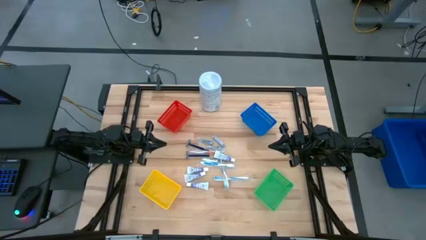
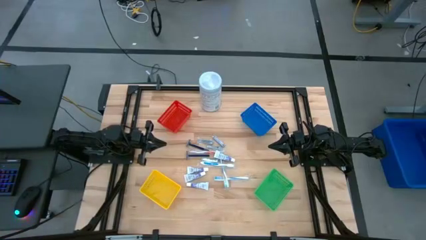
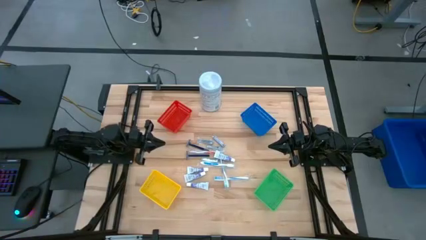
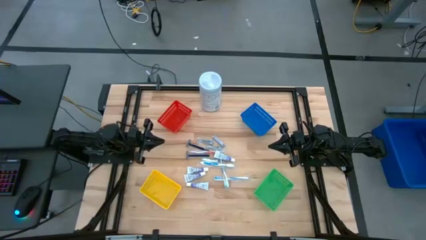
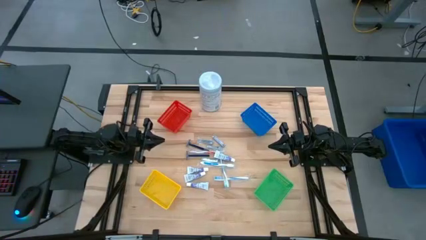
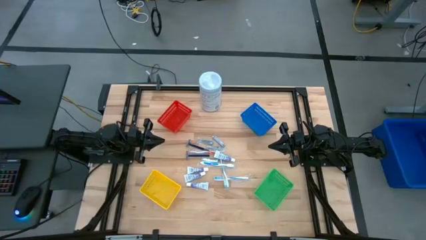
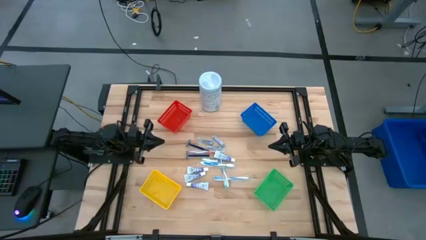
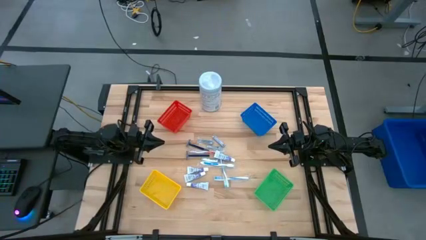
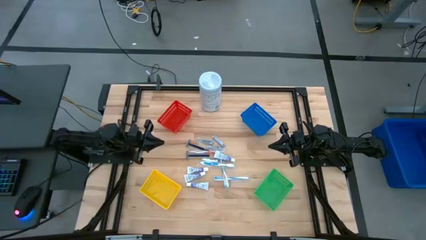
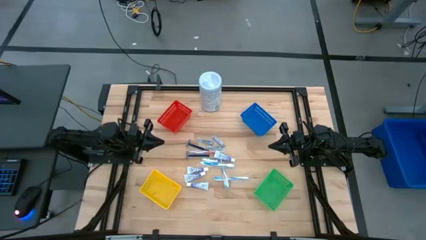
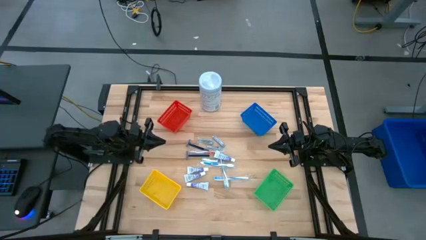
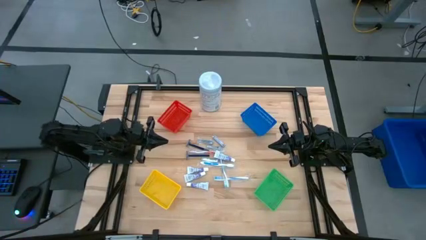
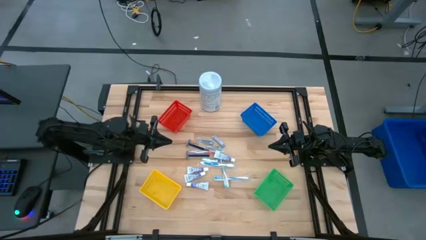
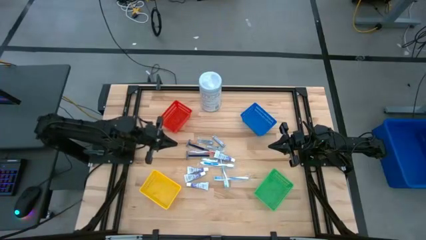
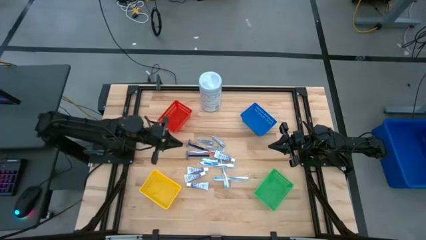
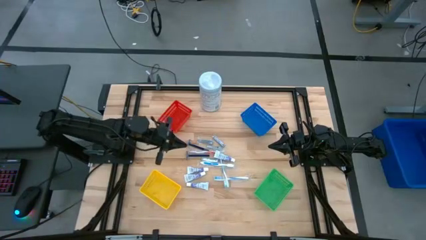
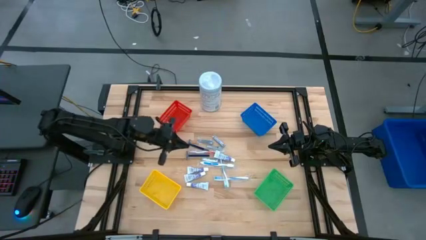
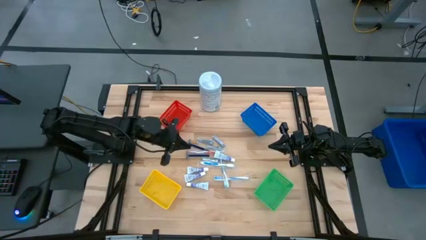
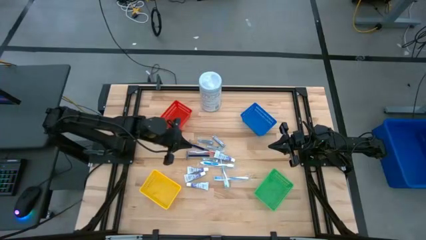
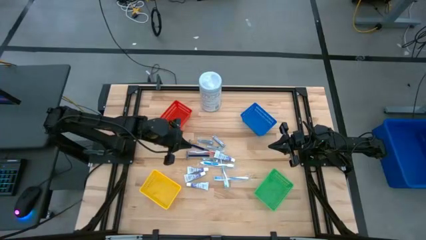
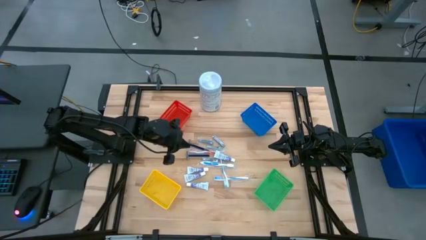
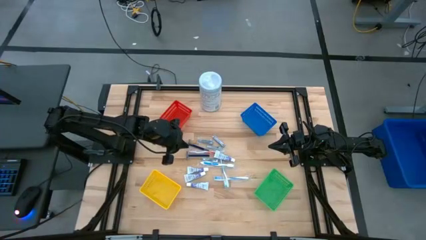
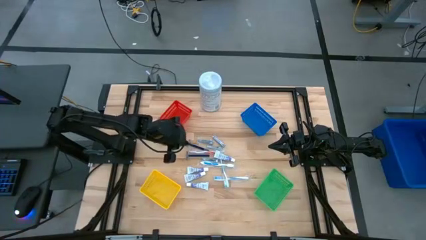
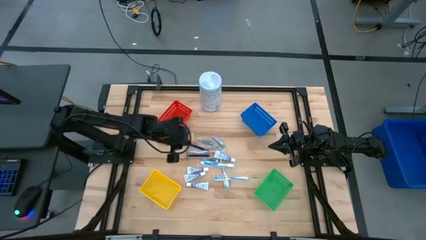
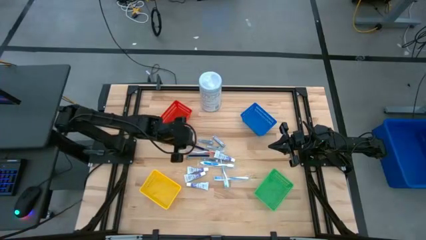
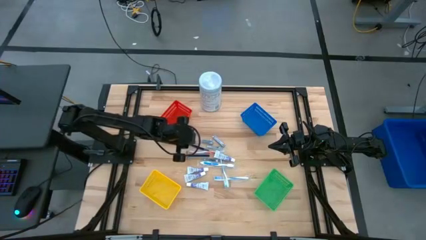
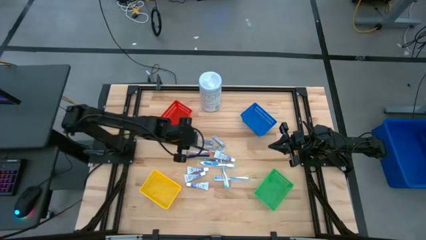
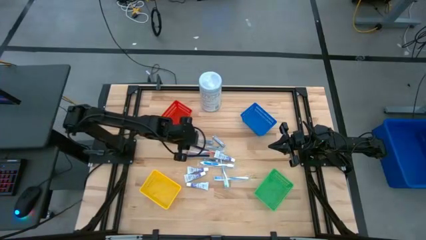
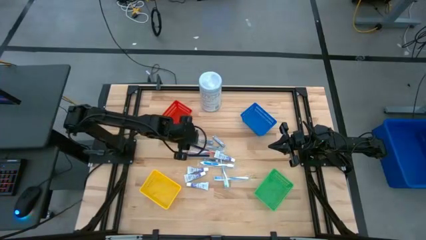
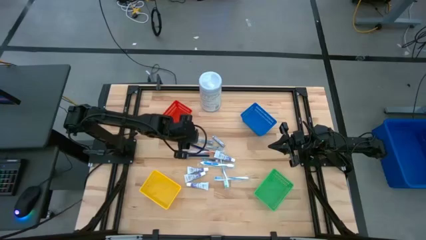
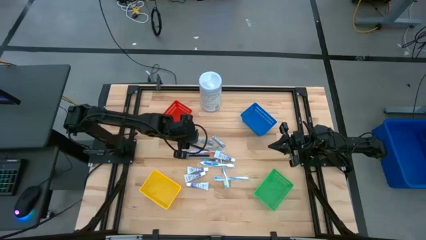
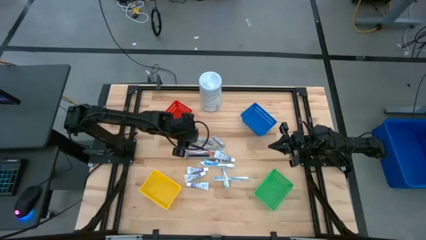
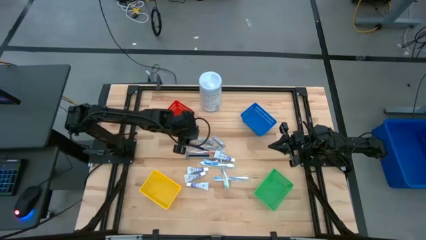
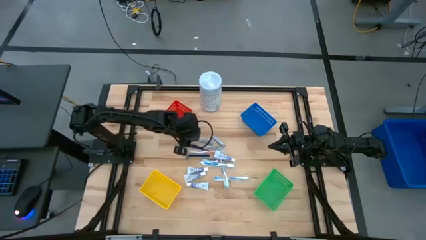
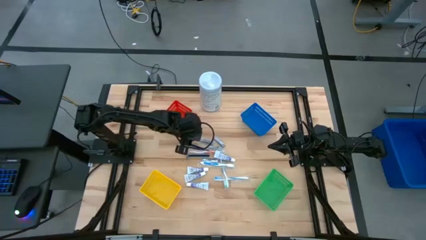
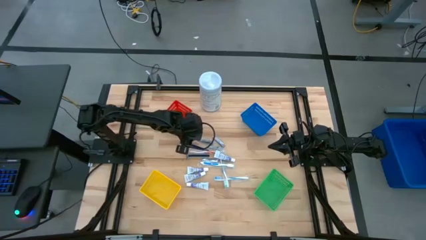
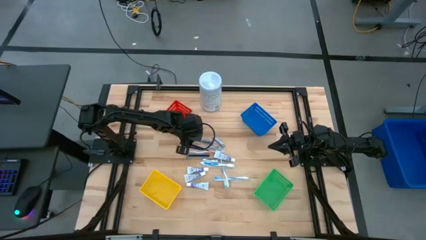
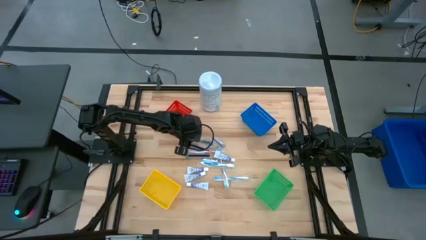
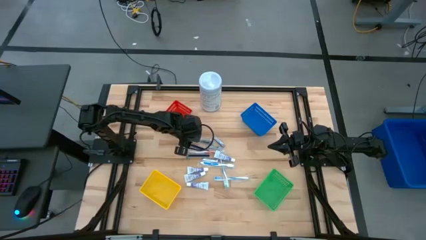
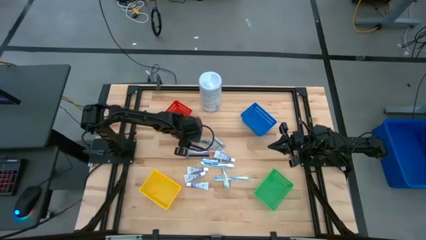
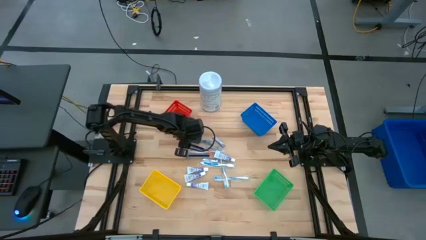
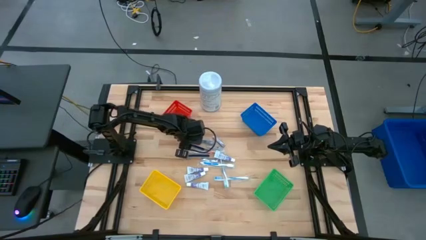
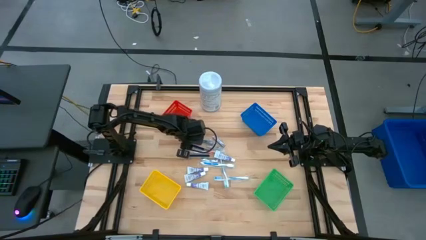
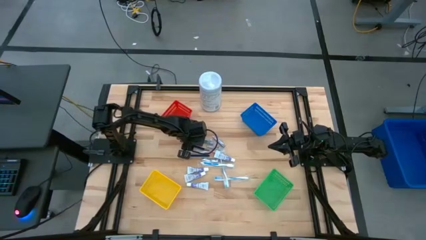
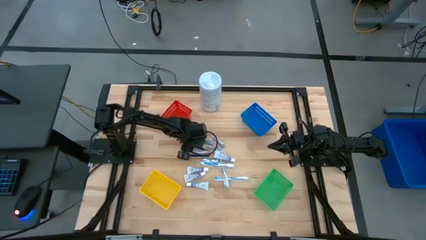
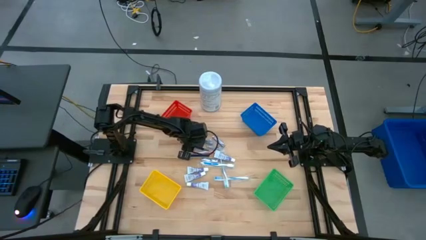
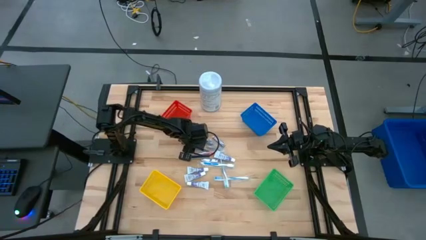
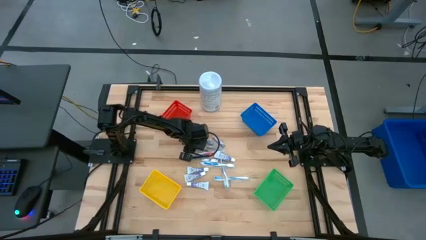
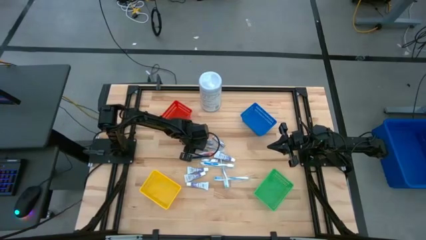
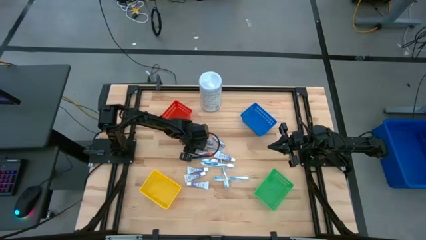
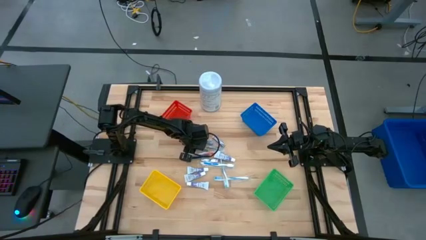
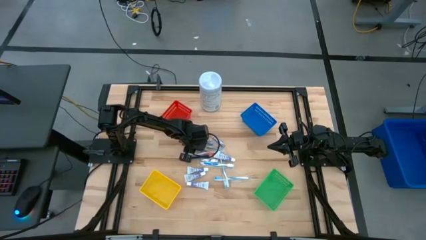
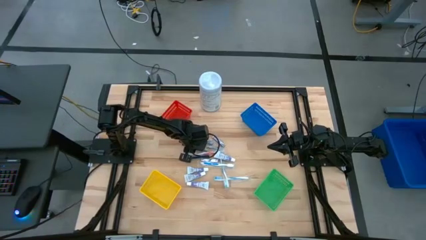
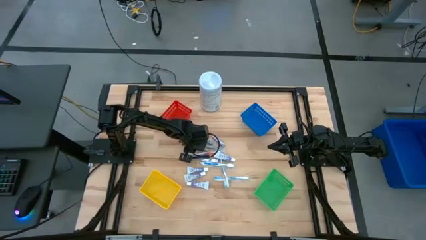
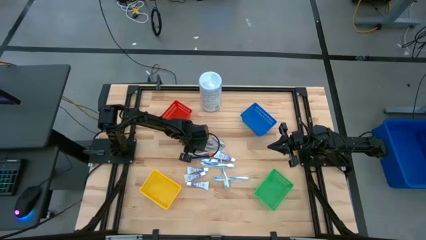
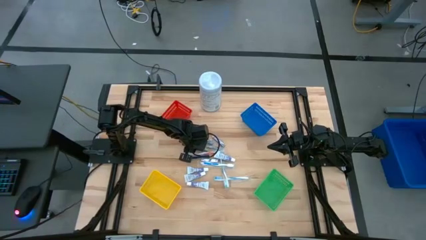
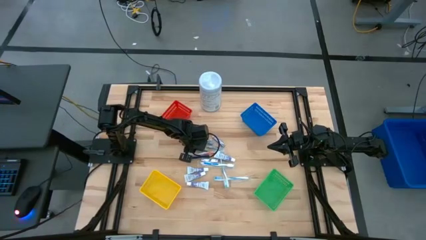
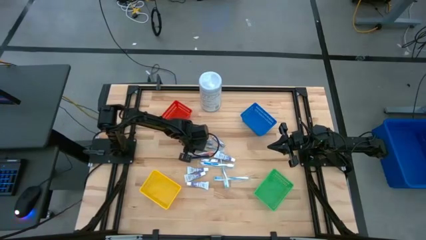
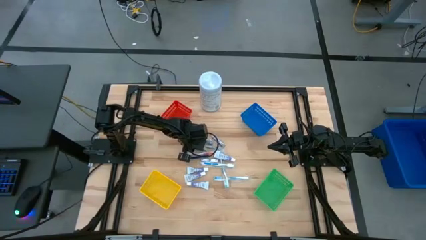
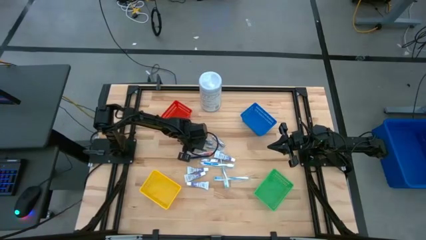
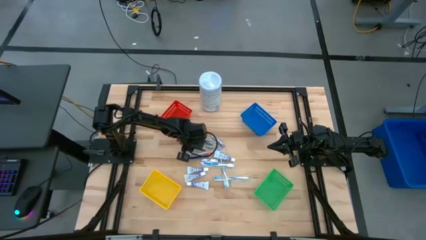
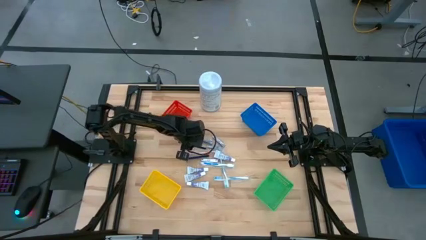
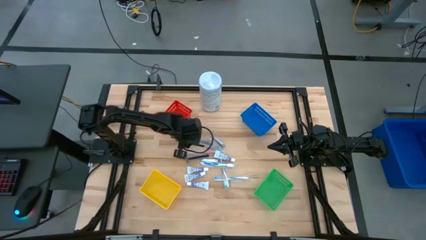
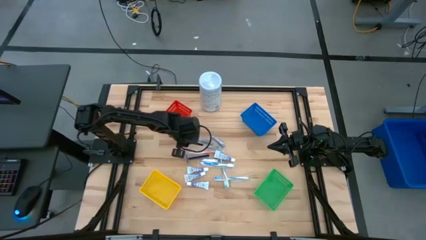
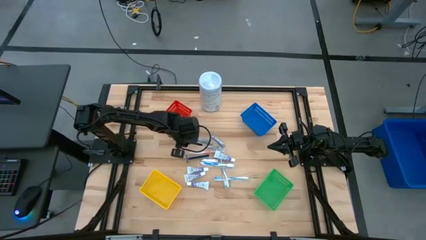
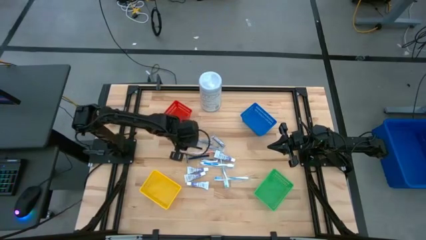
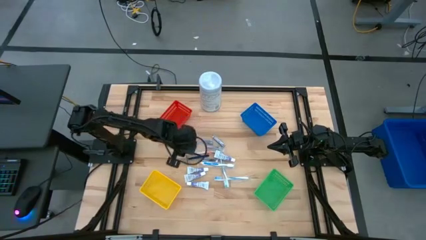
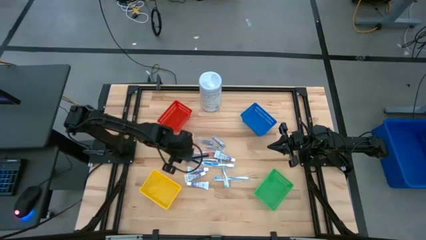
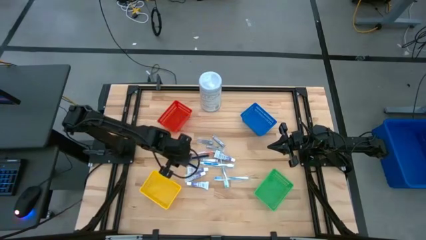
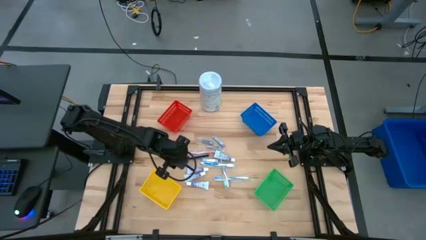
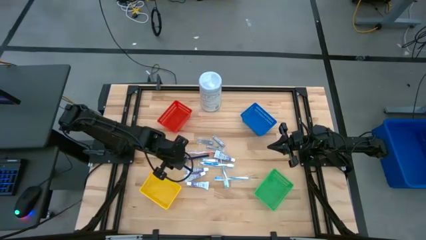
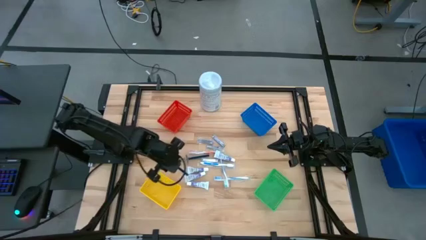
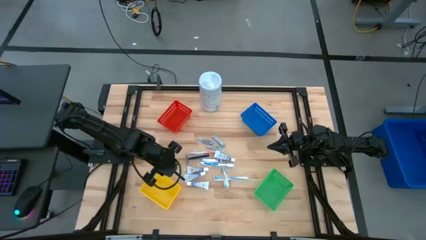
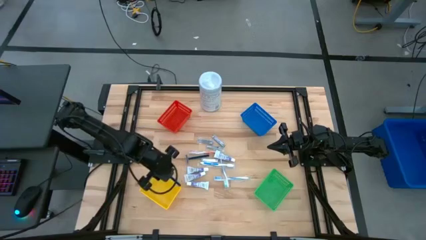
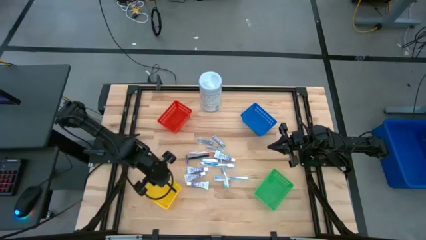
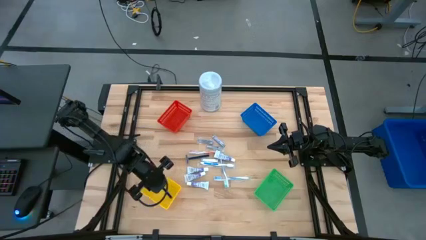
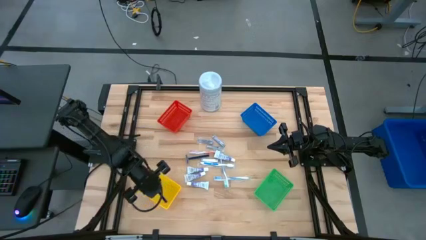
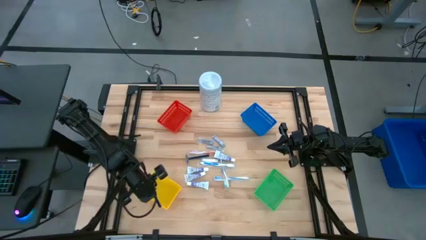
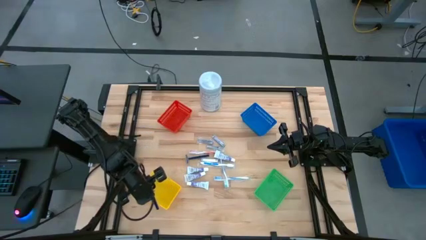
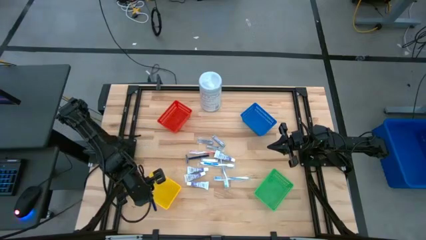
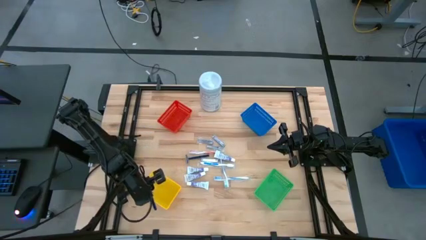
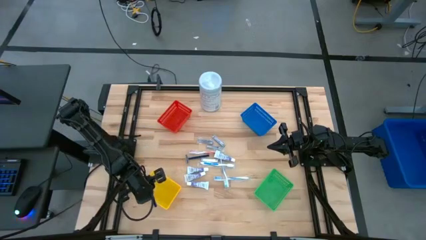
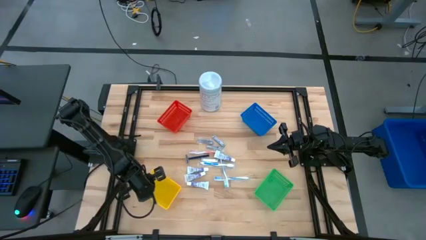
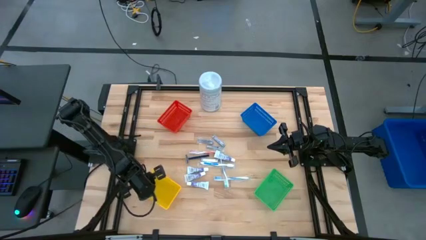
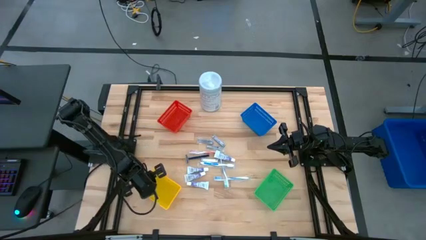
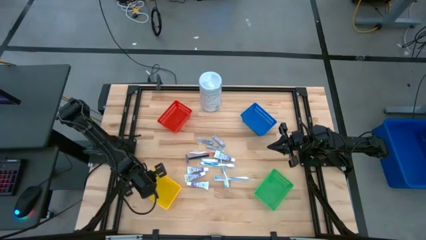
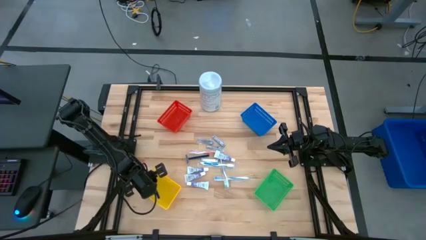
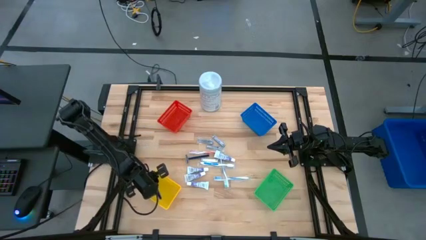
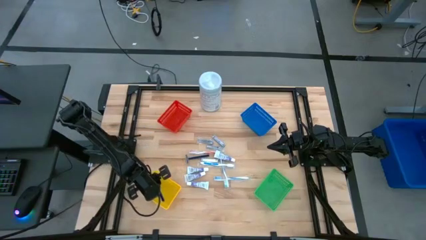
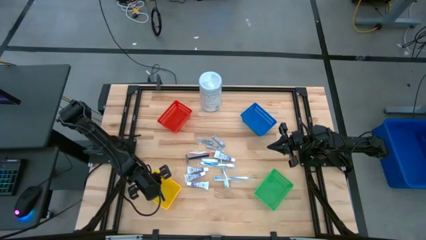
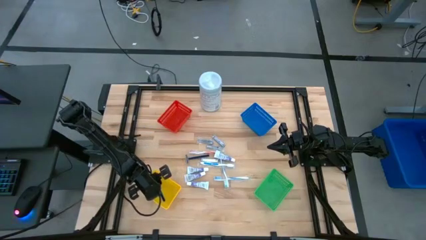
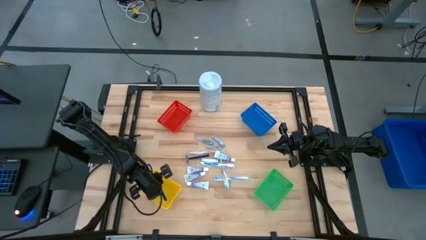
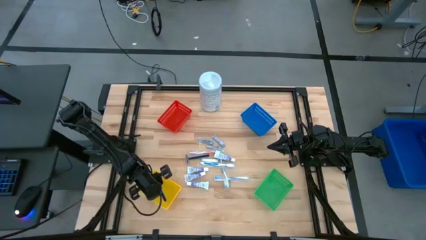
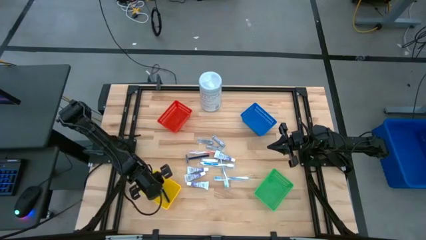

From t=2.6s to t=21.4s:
Task: Pick & Place Travel size toiletries
Put the blue razor blade into the yellow basket
